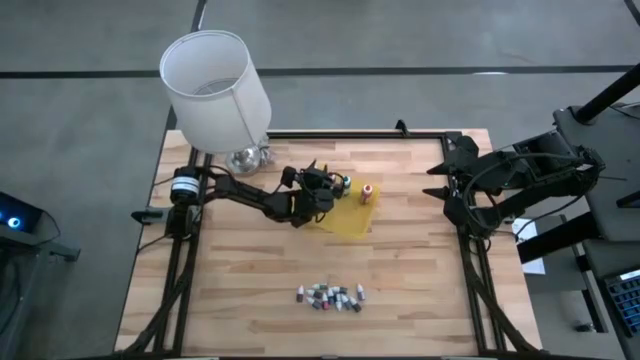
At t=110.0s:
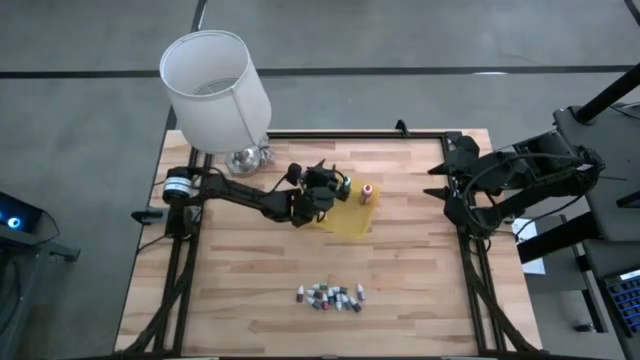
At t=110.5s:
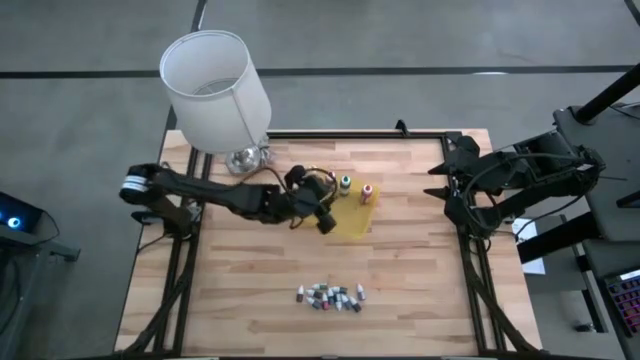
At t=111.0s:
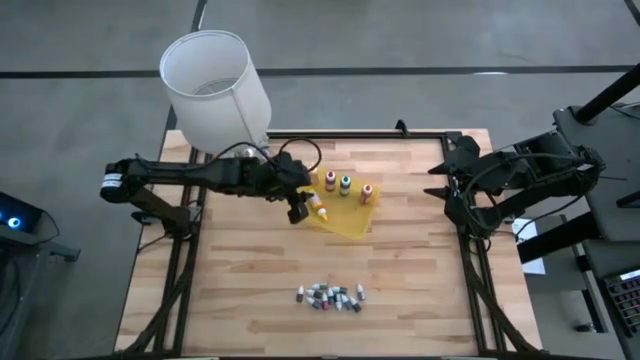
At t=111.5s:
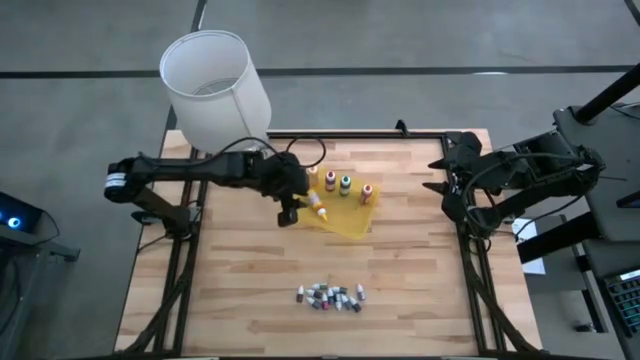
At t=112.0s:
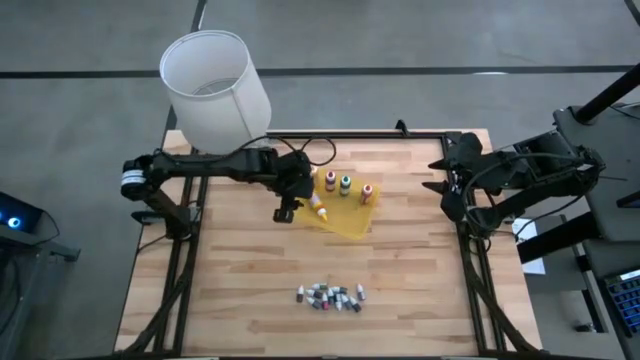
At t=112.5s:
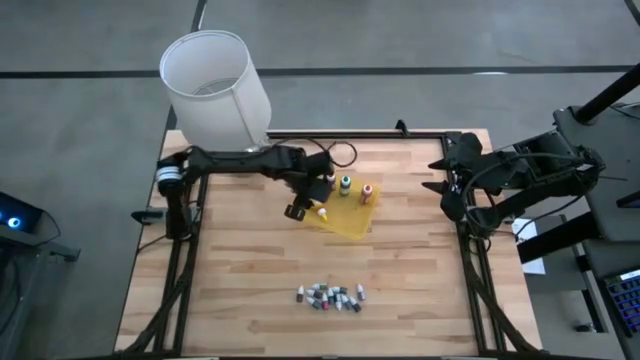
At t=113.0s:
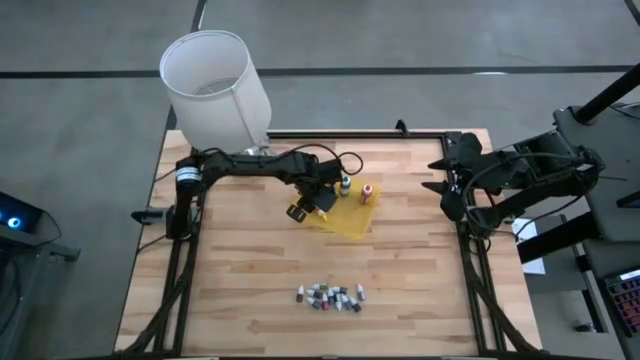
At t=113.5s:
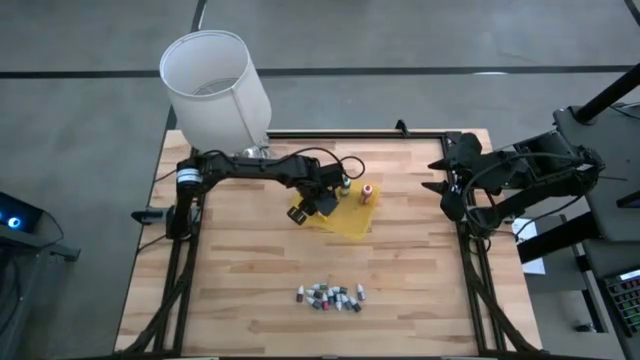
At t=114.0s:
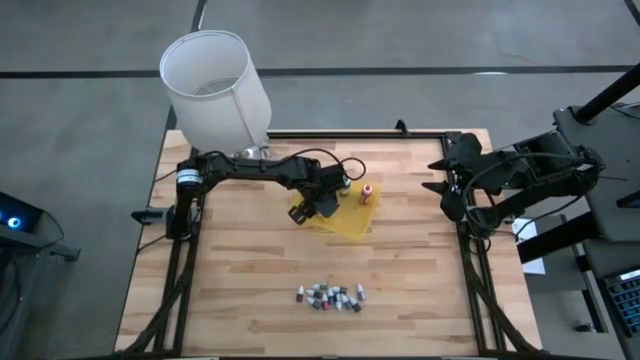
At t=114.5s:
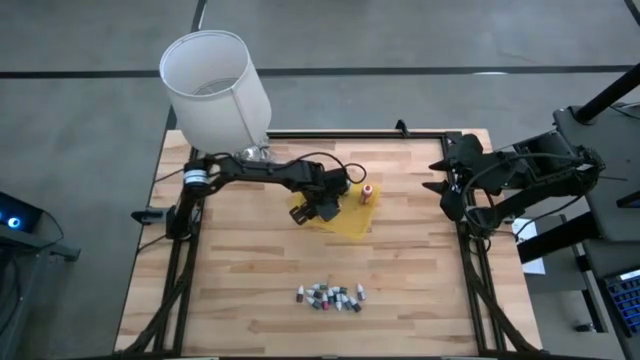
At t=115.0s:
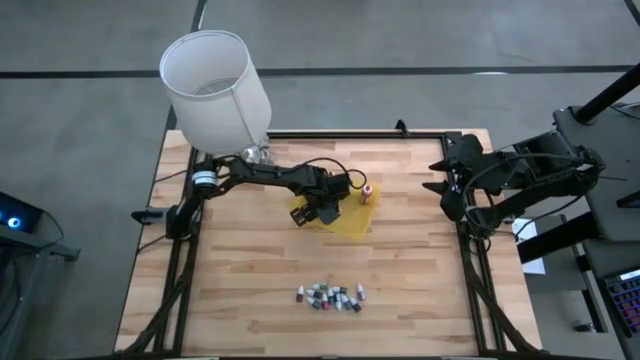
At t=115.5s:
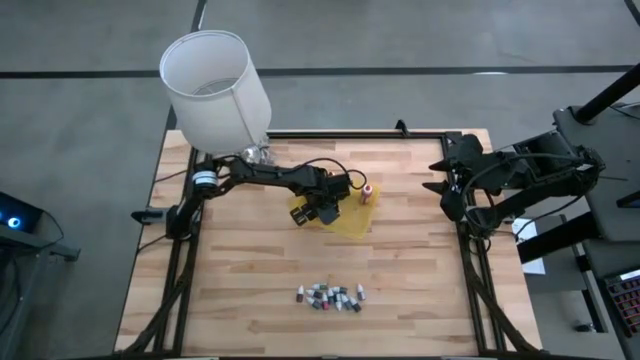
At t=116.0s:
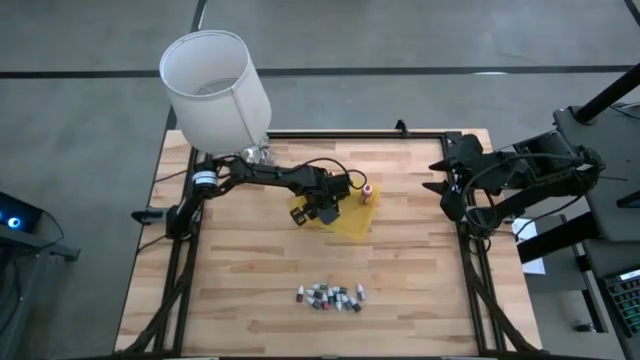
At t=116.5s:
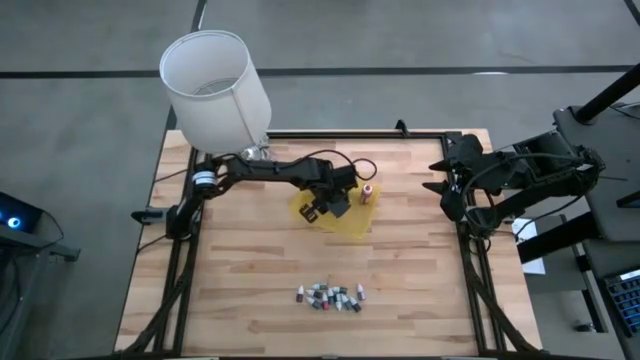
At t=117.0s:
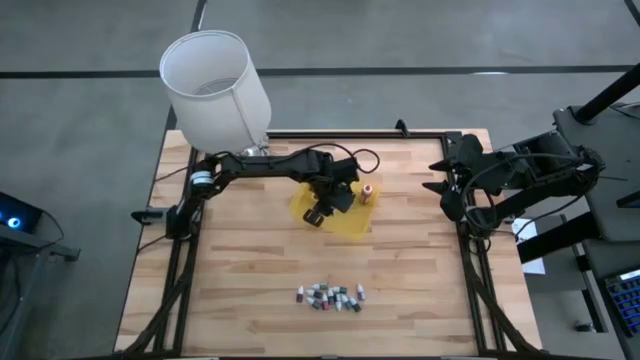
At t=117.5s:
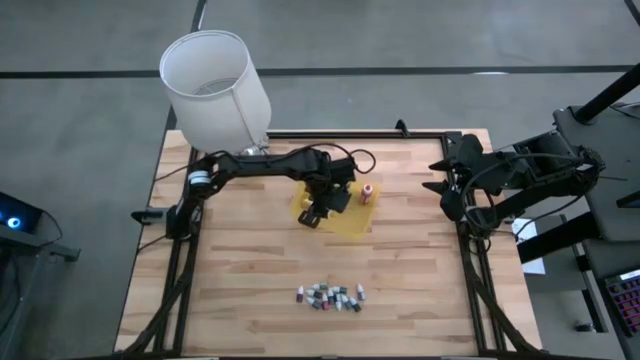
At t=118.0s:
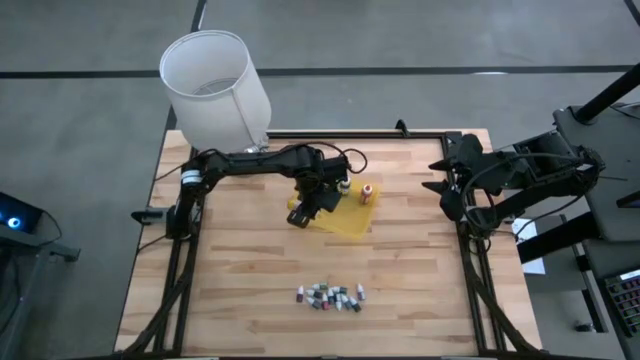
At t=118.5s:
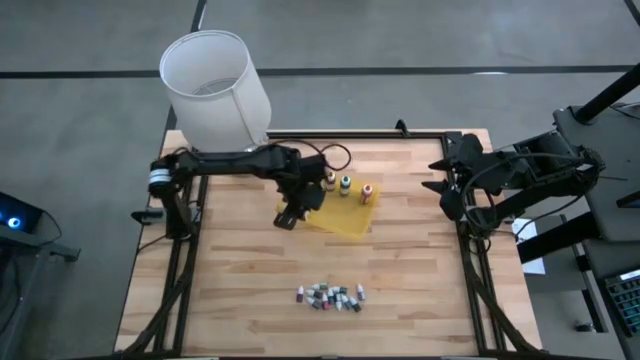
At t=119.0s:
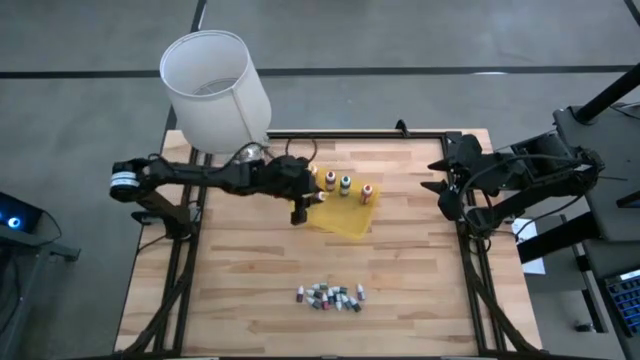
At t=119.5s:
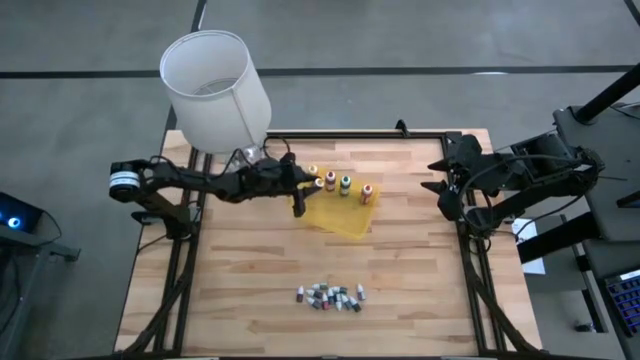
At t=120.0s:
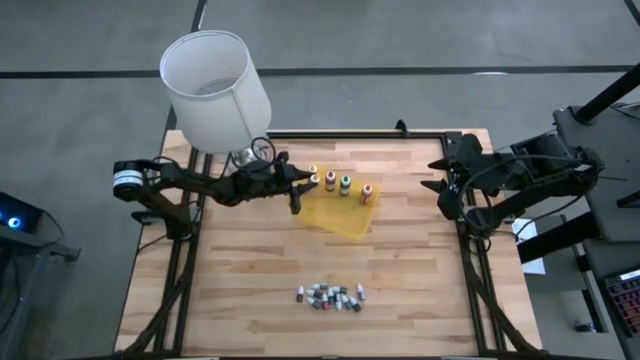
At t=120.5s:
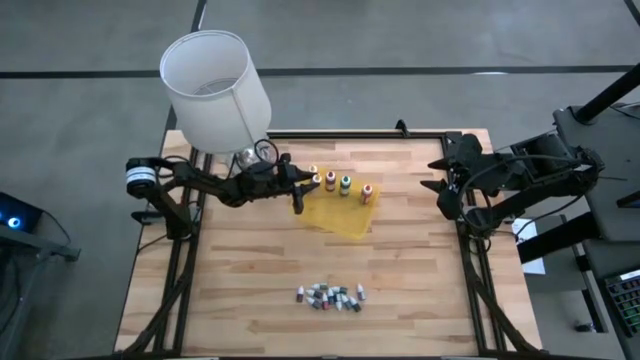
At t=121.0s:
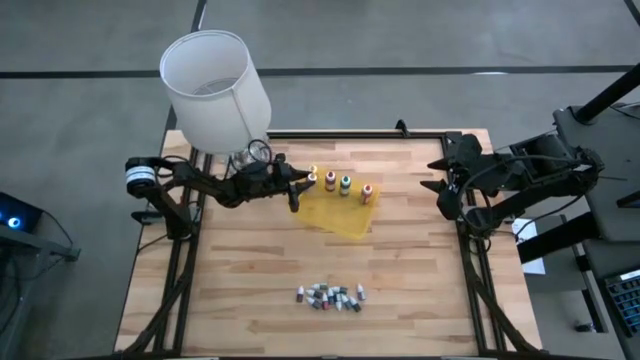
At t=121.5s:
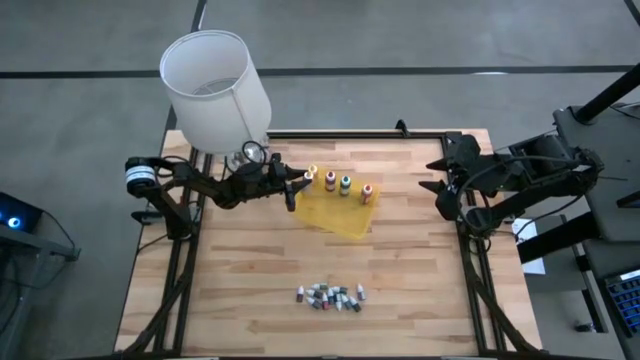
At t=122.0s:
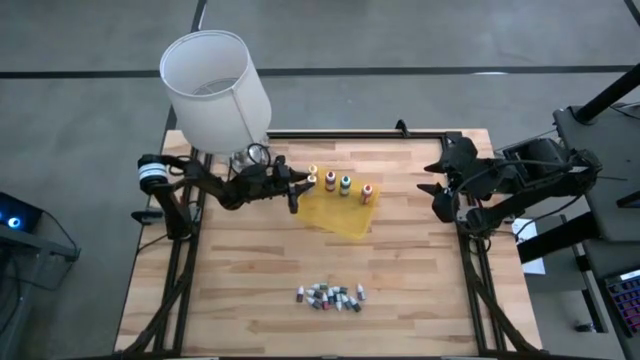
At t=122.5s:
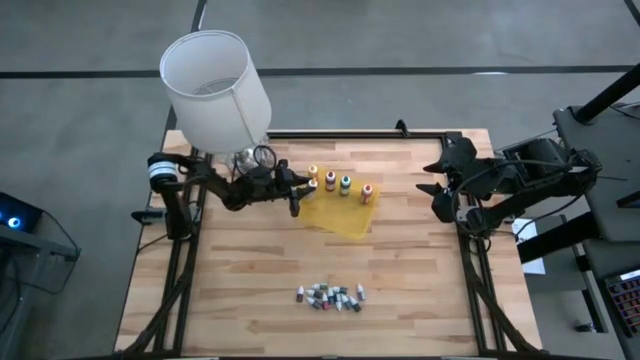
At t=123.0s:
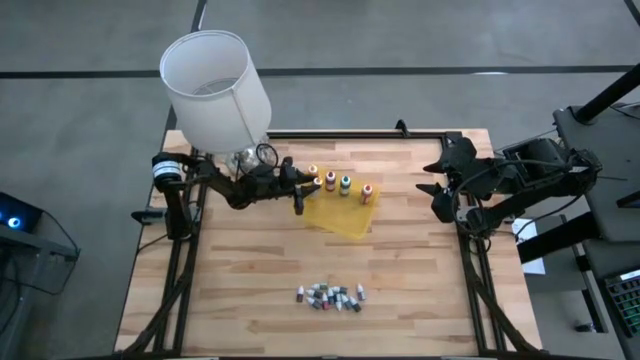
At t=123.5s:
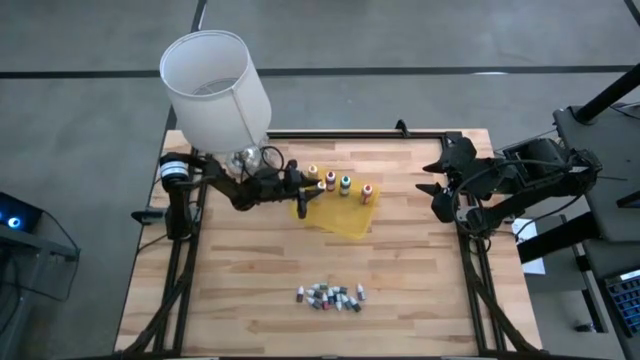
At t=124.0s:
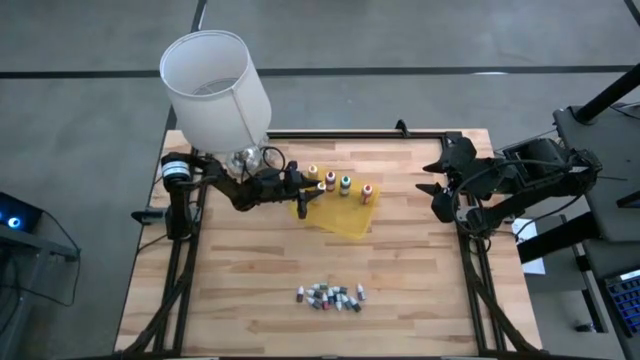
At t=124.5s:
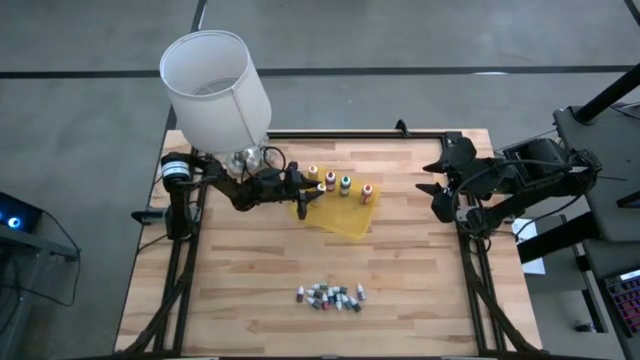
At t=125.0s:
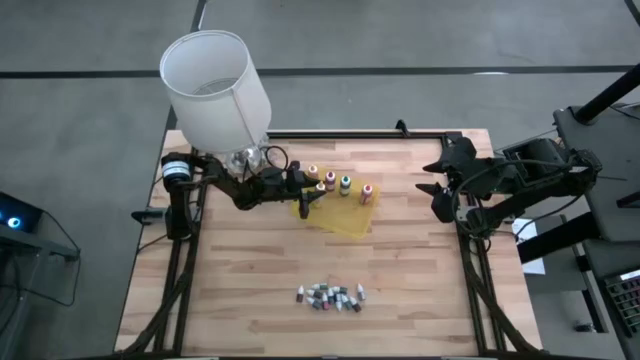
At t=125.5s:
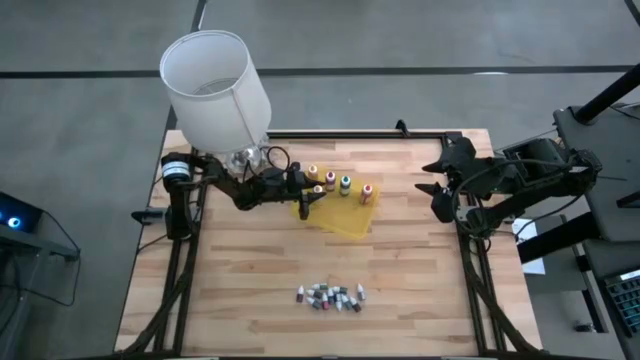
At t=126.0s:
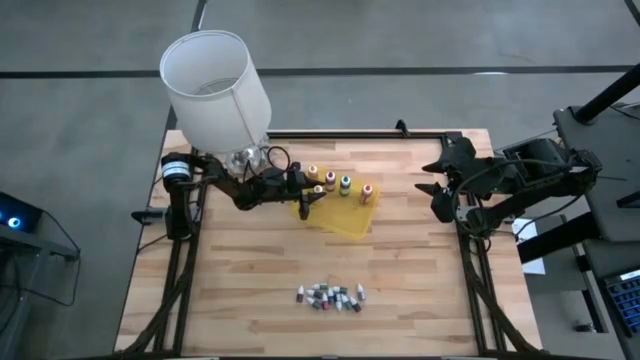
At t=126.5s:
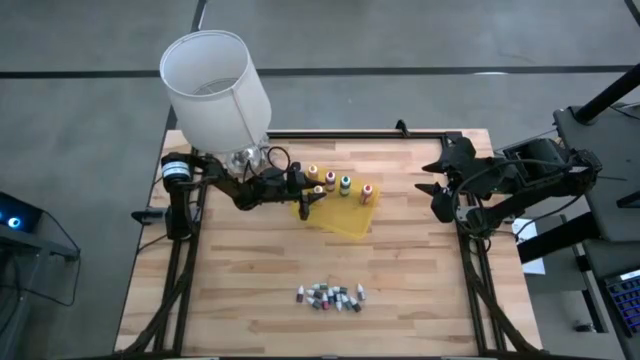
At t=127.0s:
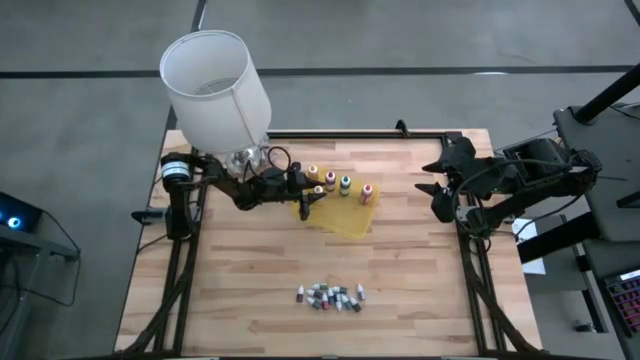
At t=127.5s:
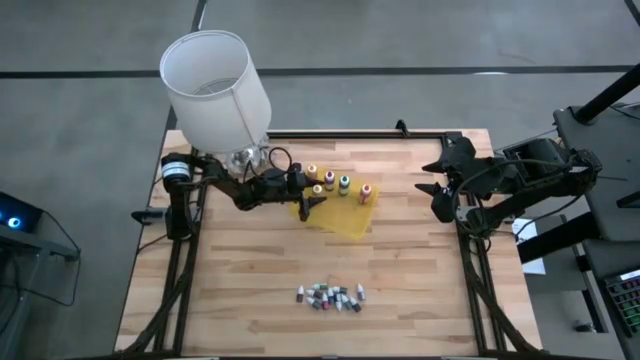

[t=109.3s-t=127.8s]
Task: Pick & Place food coloring
Put the large yellow food coloring bottle into the yellow bin

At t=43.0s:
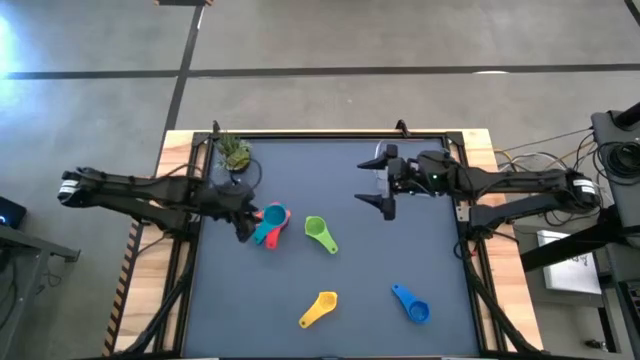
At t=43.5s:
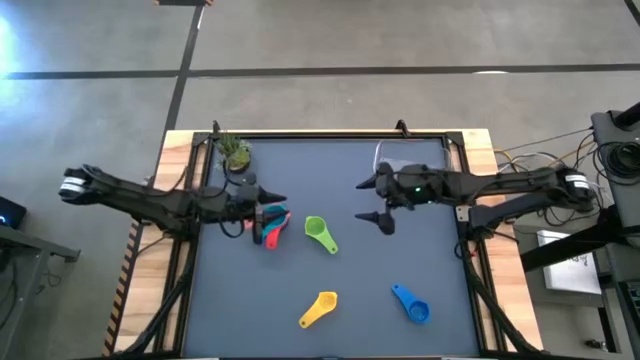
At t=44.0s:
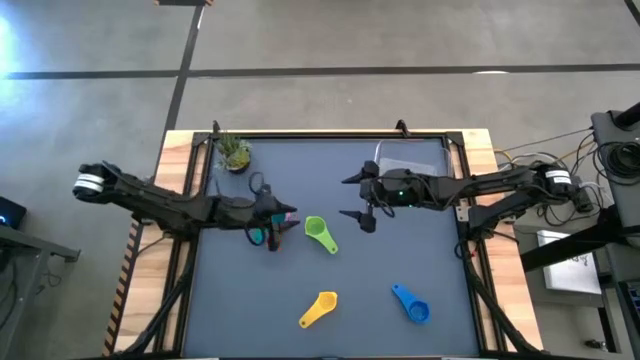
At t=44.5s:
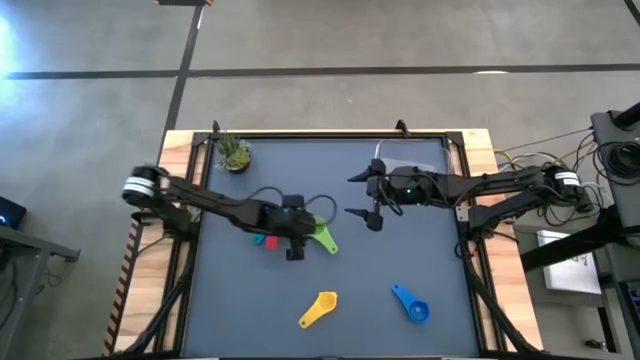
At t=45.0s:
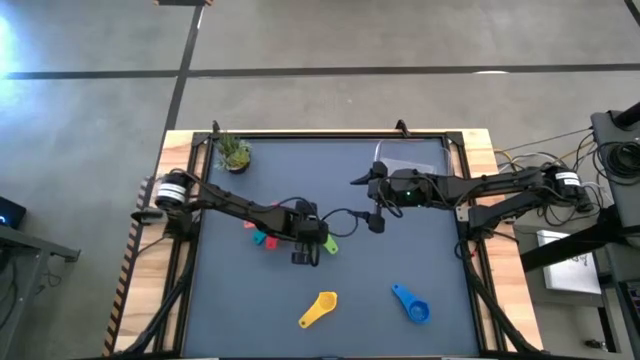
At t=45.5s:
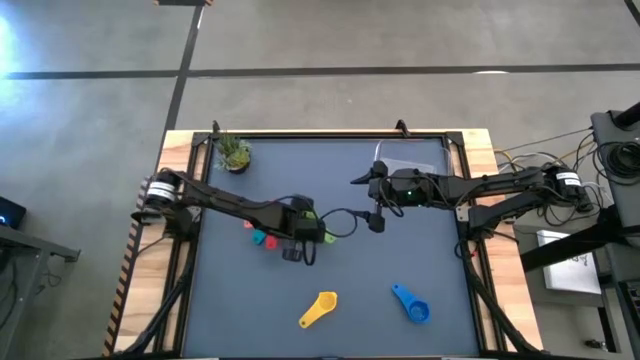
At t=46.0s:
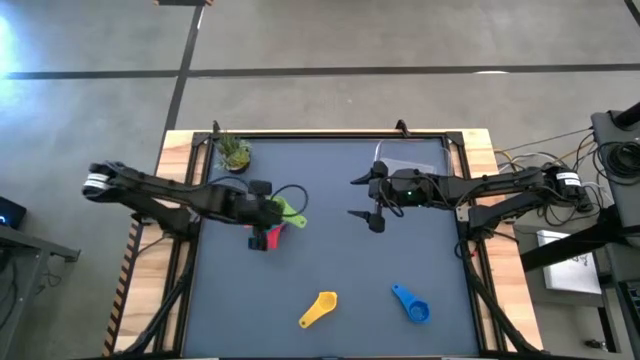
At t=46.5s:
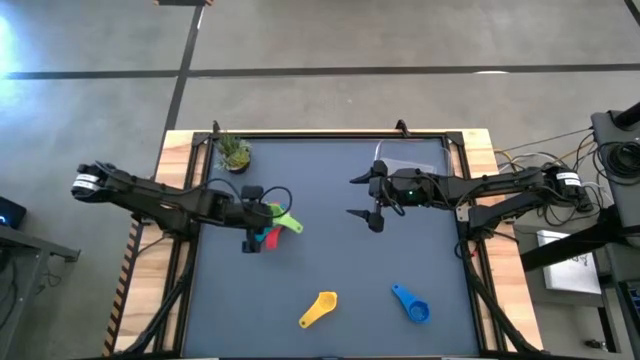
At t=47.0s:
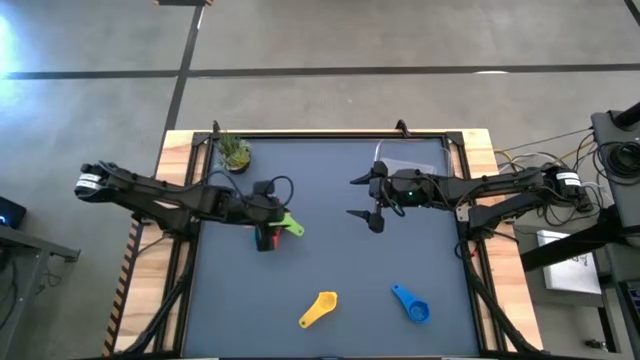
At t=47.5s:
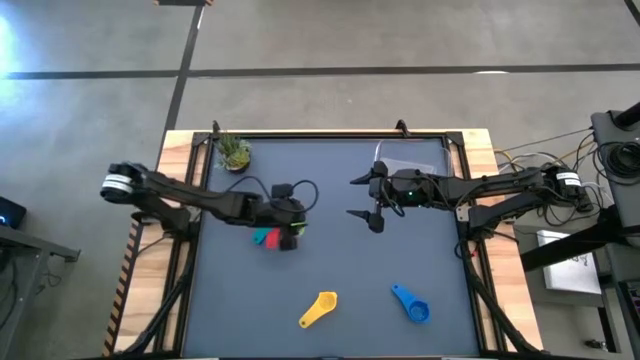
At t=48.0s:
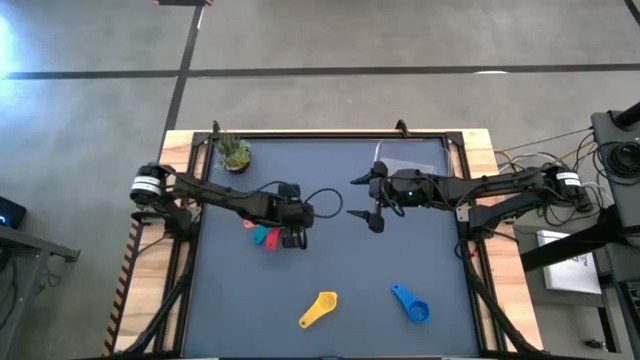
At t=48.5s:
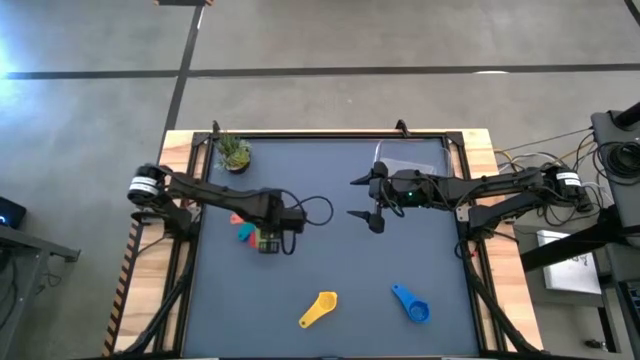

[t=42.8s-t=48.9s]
Task: Nest measuring cups in basket
Stack the green measuring cup on top of the light blue measuring cup
